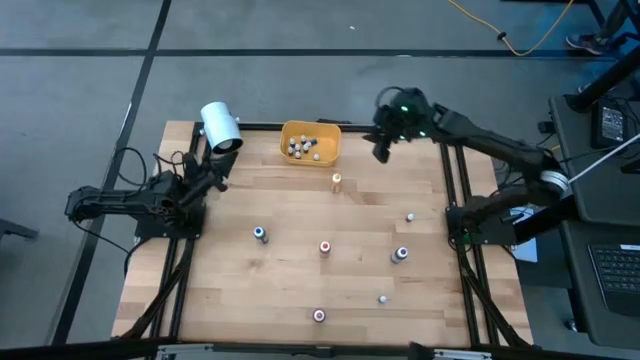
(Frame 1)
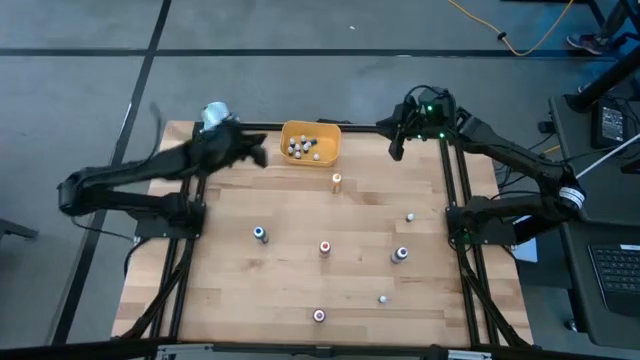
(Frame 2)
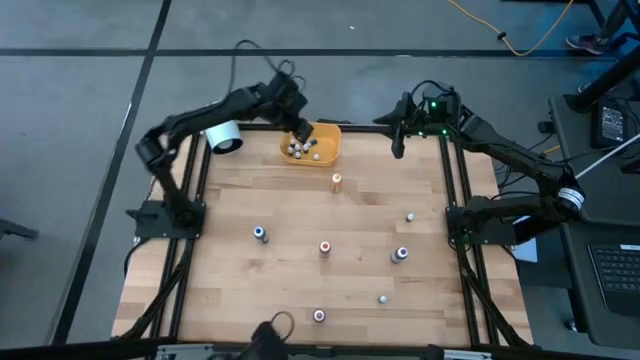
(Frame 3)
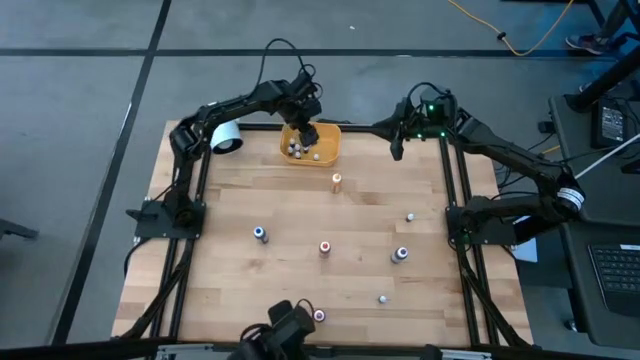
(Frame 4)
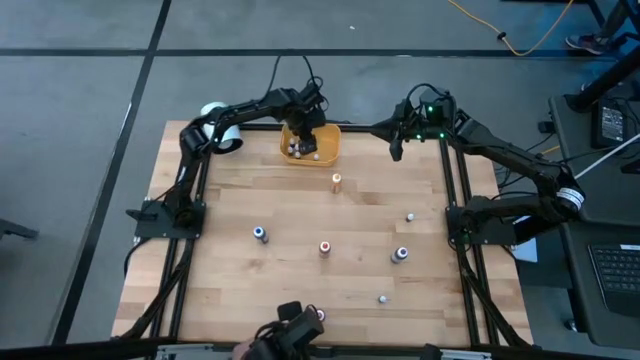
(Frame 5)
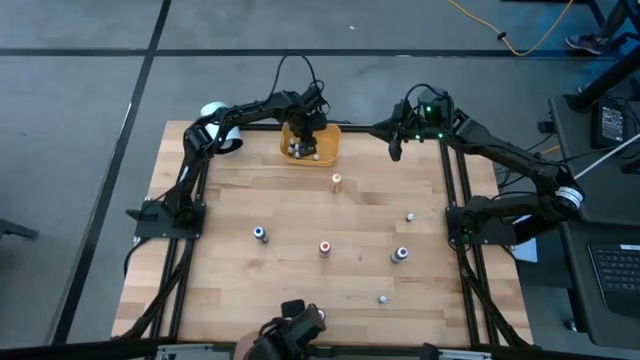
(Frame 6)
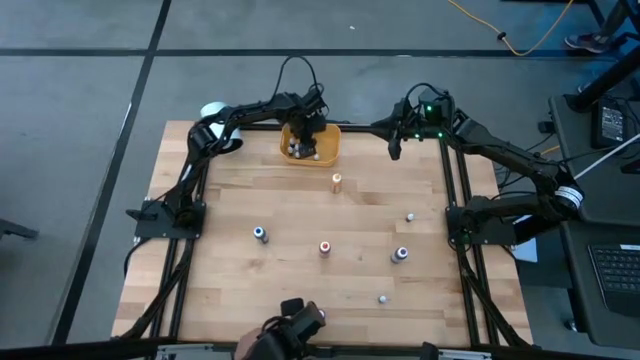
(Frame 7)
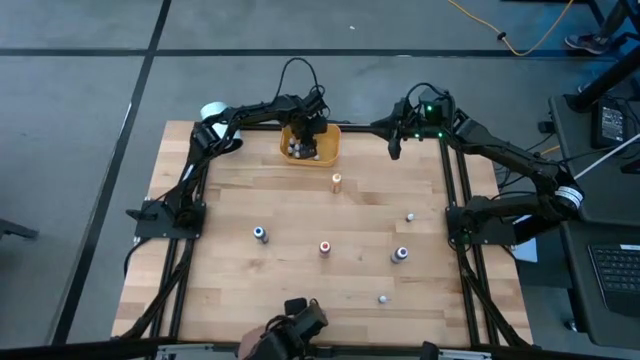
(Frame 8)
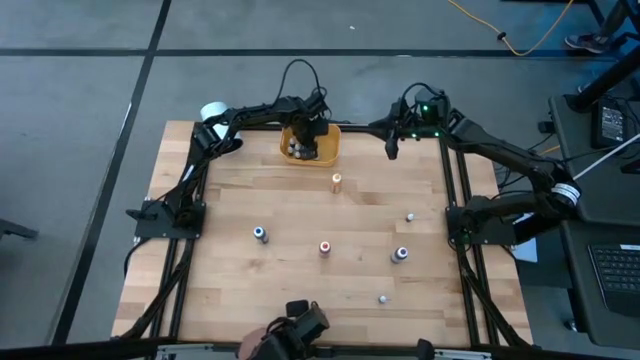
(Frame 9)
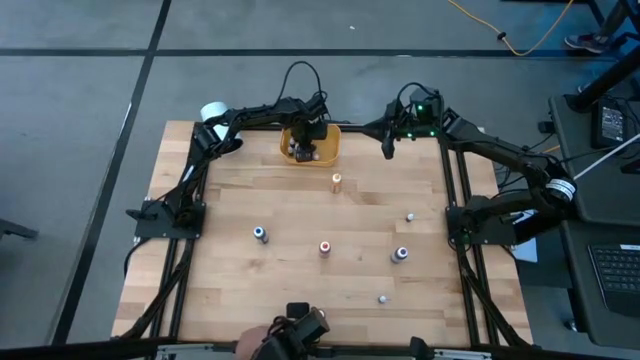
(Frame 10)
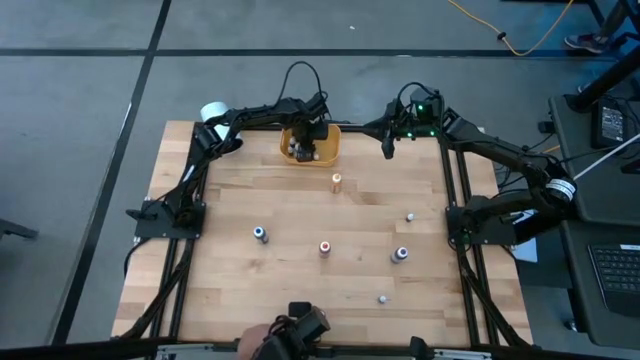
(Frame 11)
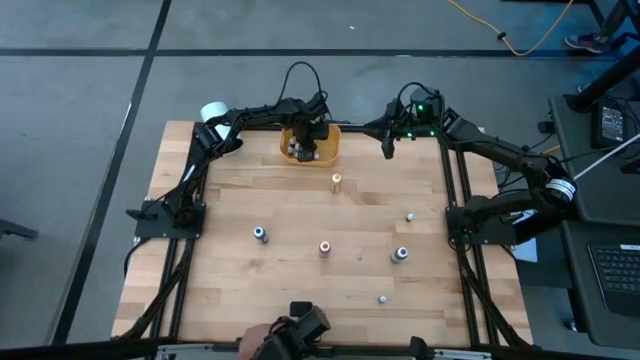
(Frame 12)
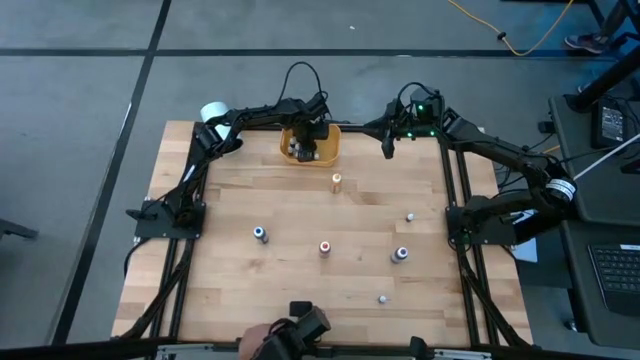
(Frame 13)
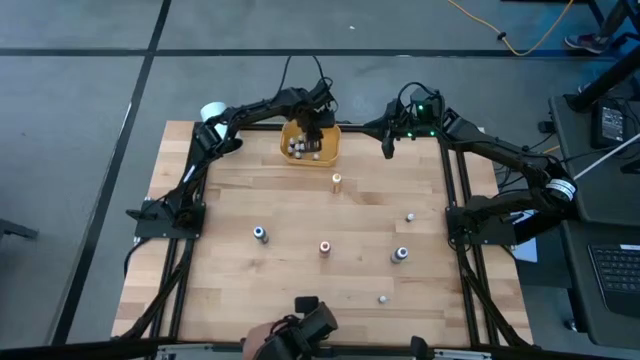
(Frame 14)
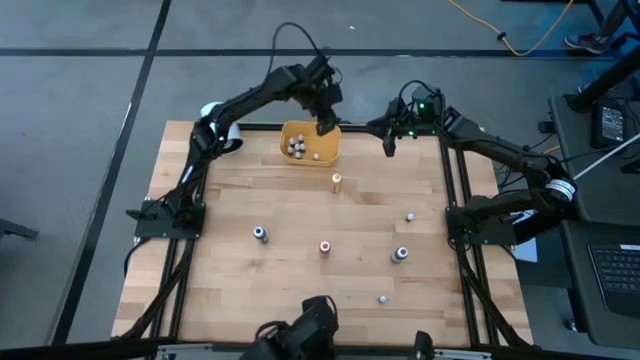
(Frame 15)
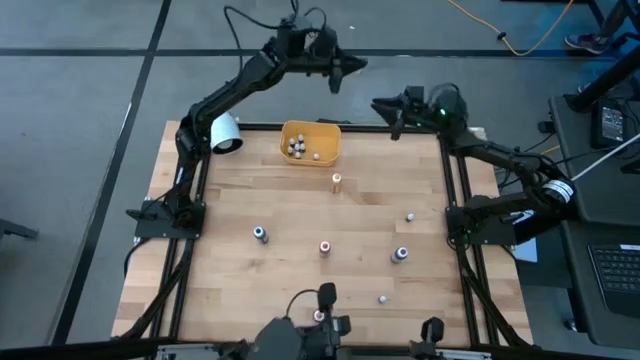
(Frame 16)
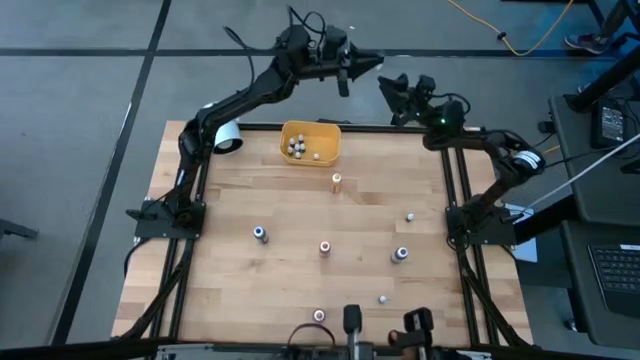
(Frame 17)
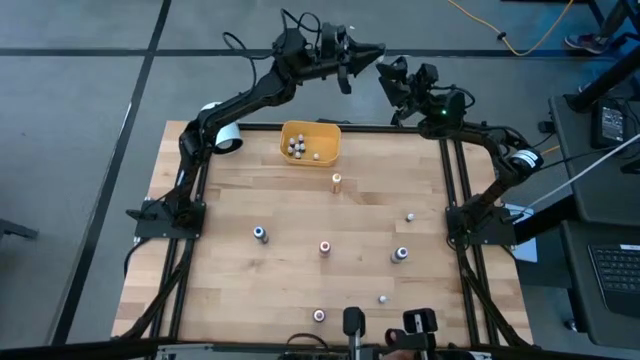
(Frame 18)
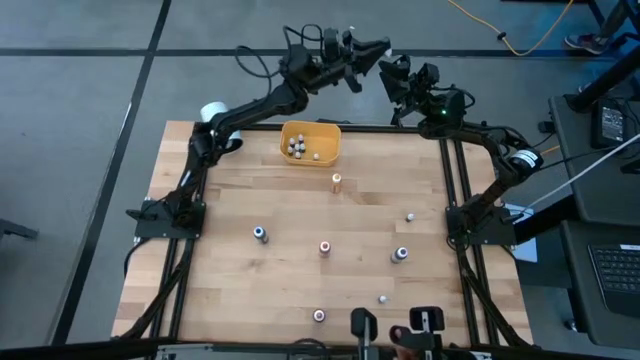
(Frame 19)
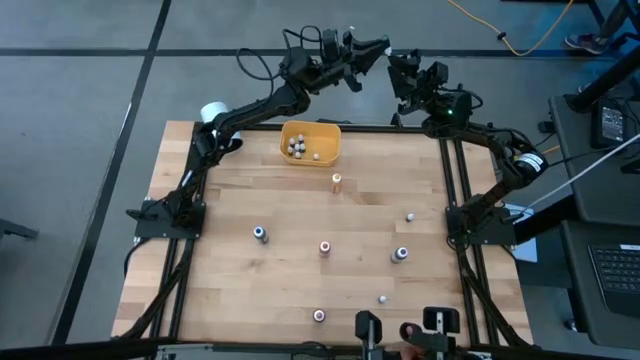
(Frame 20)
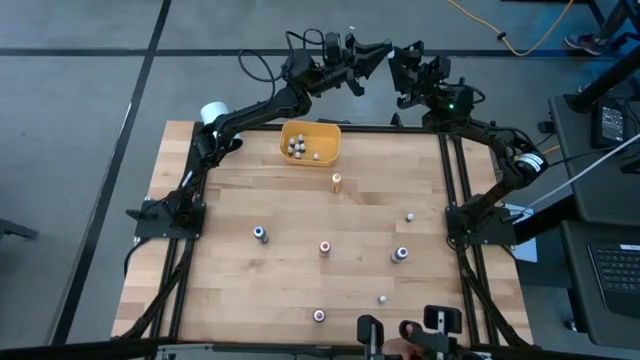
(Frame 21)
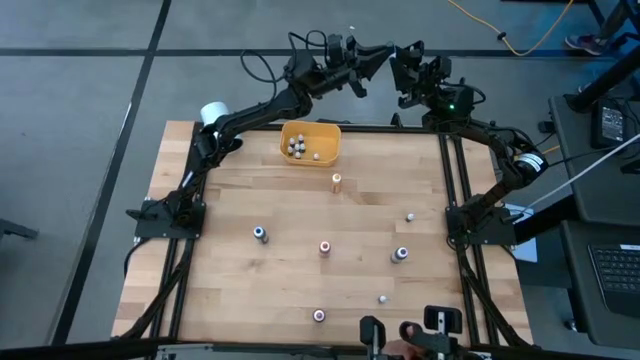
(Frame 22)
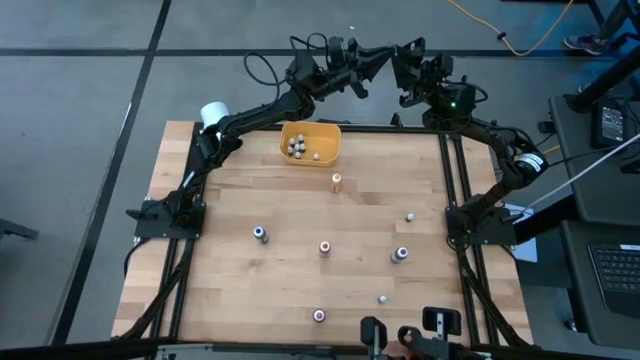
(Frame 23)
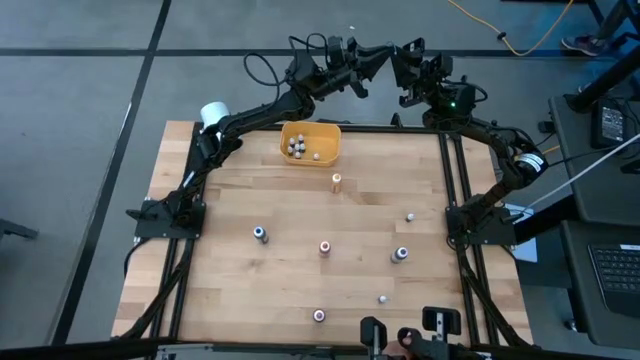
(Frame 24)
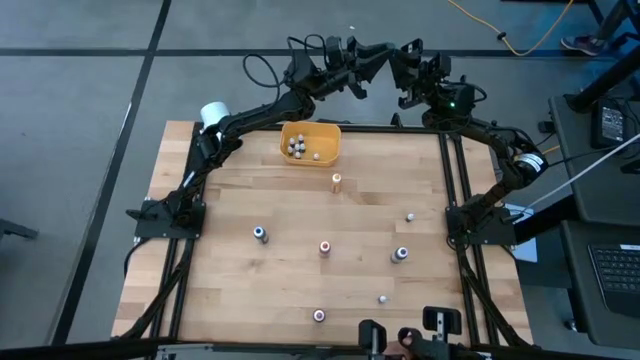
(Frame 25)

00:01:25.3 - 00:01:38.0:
Task: Pick & Place food coloring
Put the small blue food coloring bottle into the yellow bin

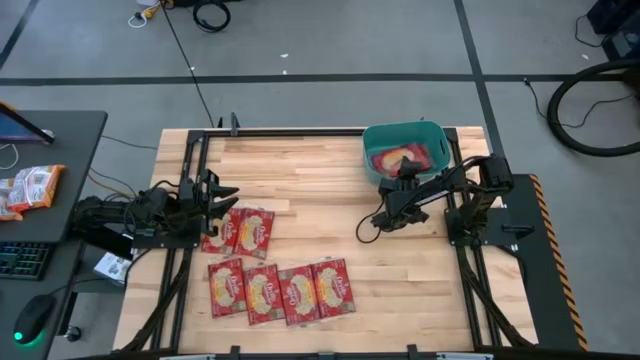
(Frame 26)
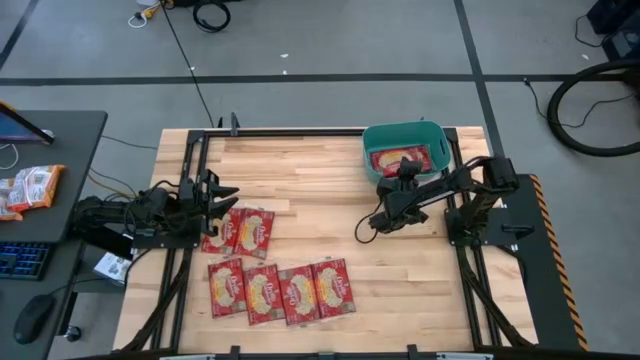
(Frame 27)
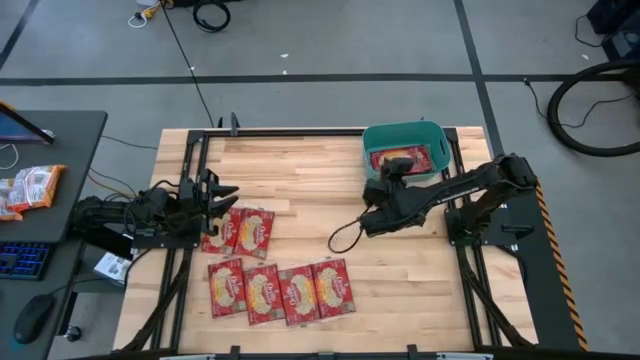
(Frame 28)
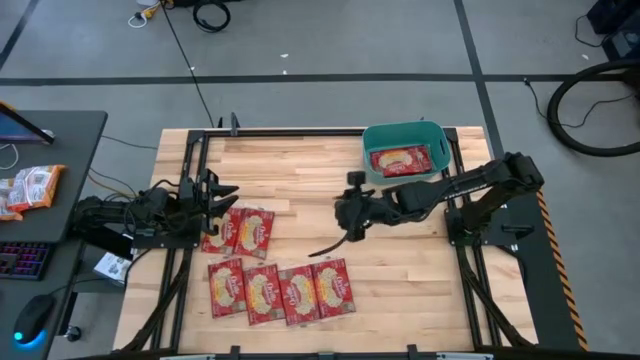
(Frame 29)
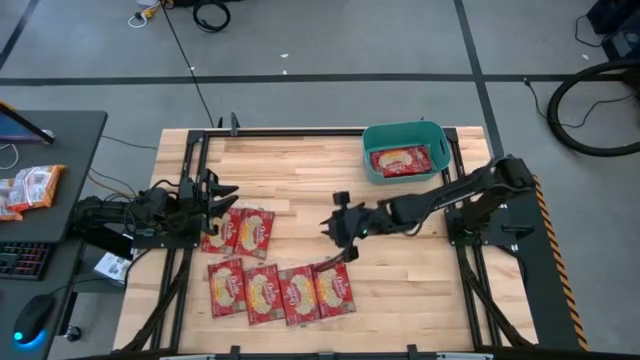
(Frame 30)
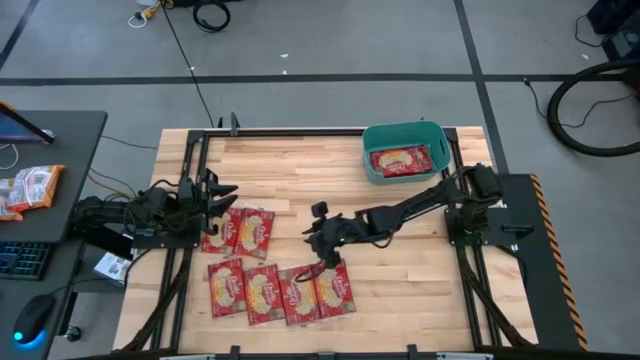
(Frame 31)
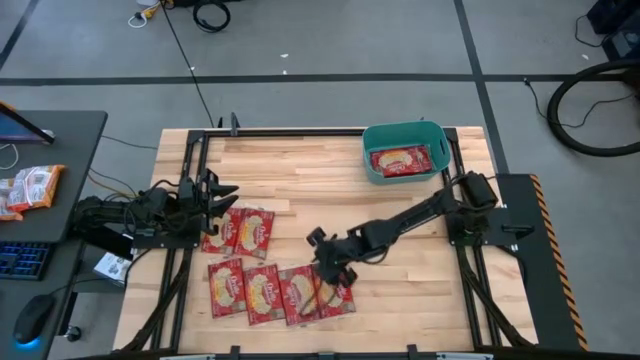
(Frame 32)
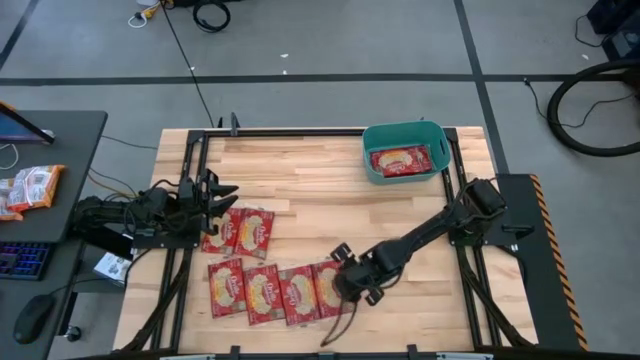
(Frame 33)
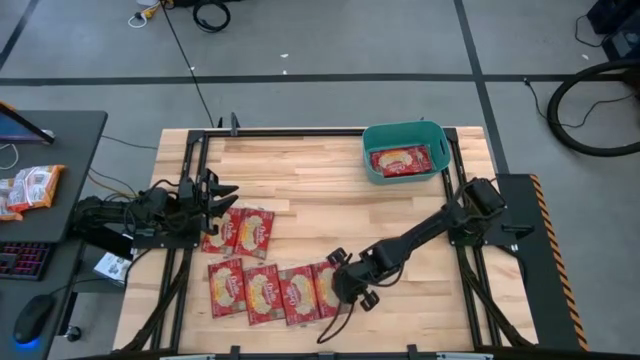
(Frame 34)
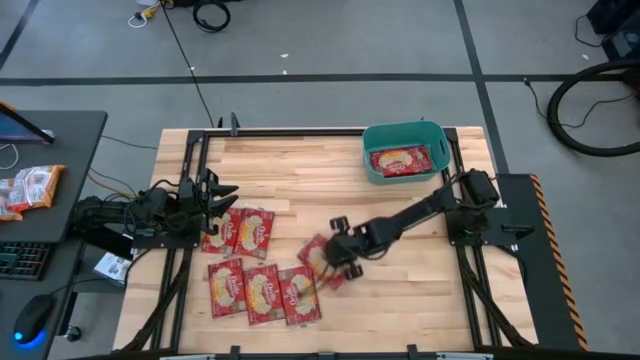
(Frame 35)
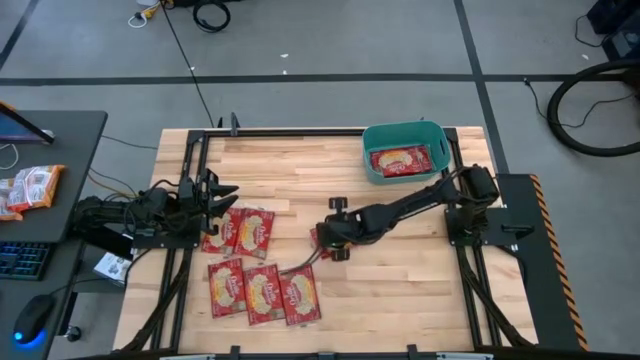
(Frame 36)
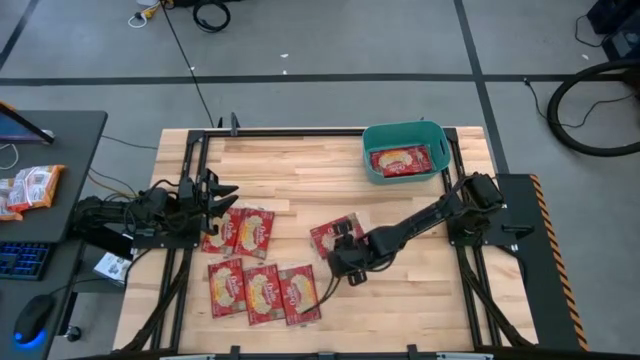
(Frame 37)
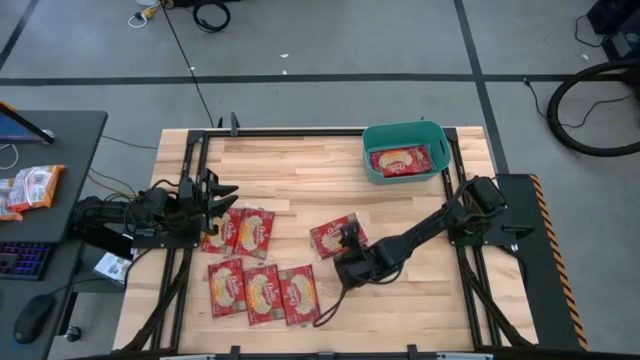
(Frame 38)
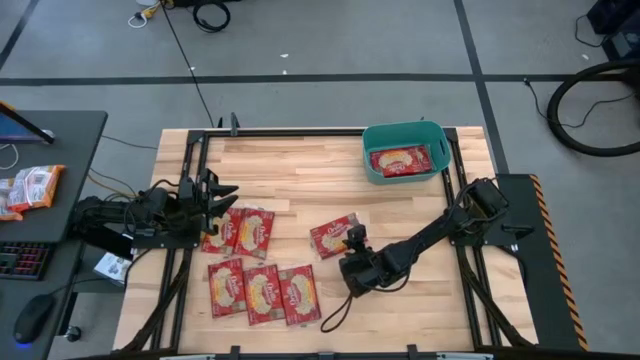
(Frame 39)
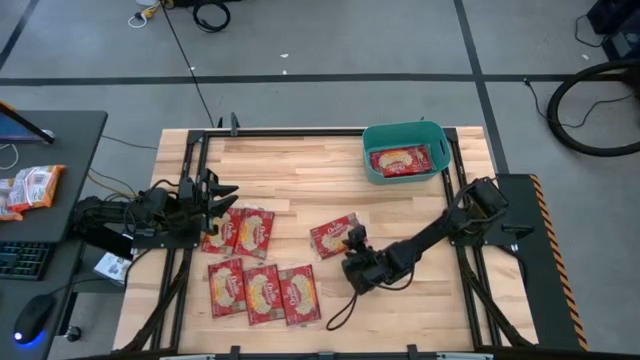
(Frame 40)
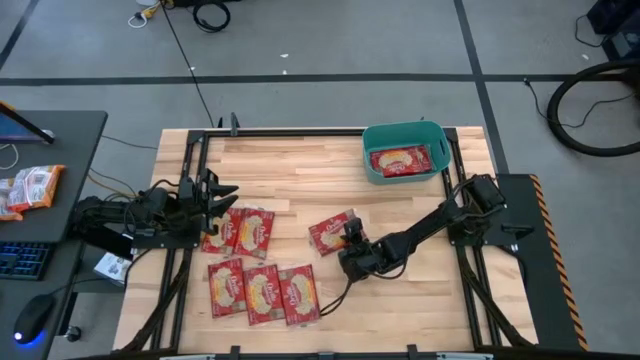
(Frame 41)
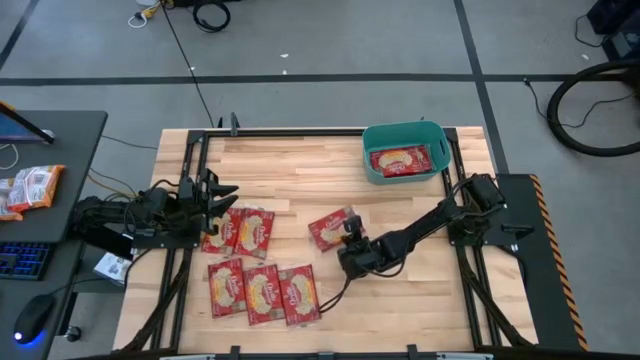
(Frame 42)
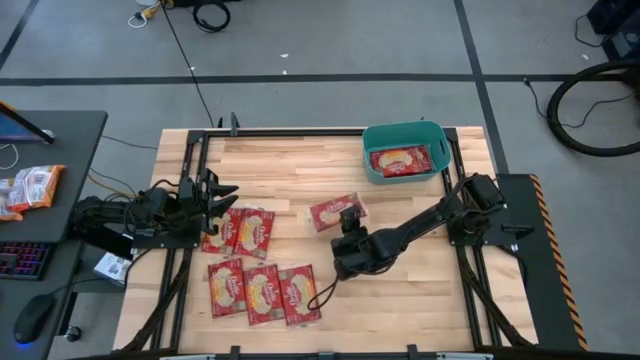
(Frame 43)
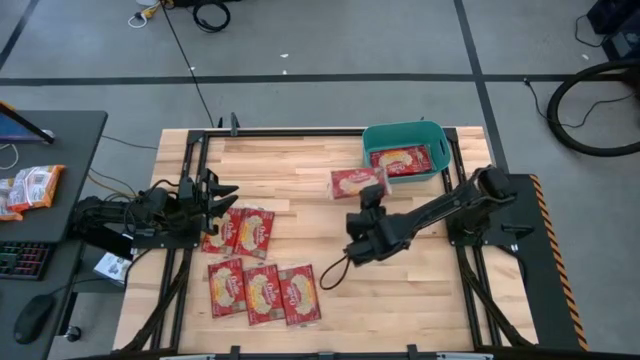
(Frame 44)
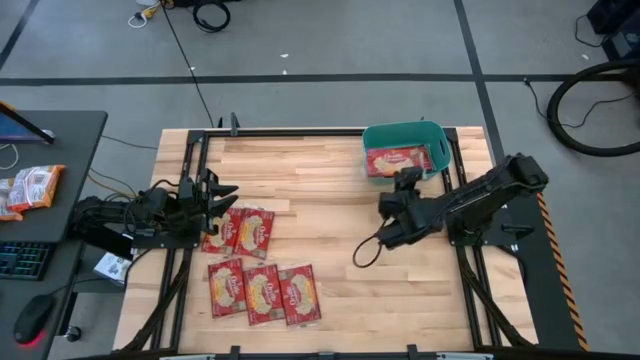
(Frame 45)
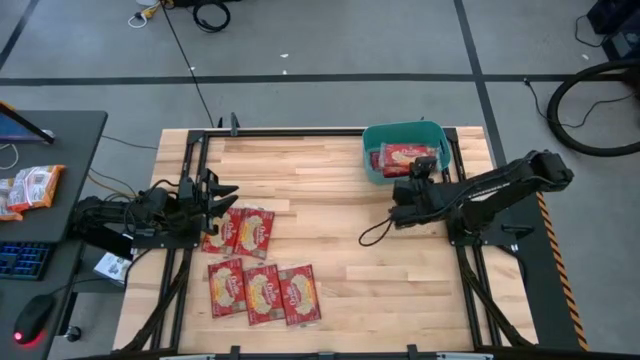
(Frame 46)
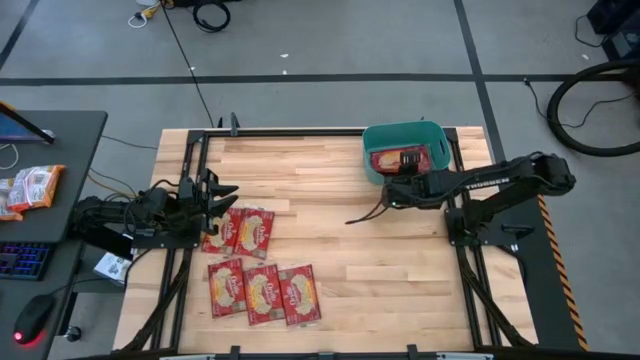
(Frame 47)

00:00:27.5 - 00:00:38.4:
Task: Sort popcorn bags into baskets
Put the red popcorn bag into the green bin
